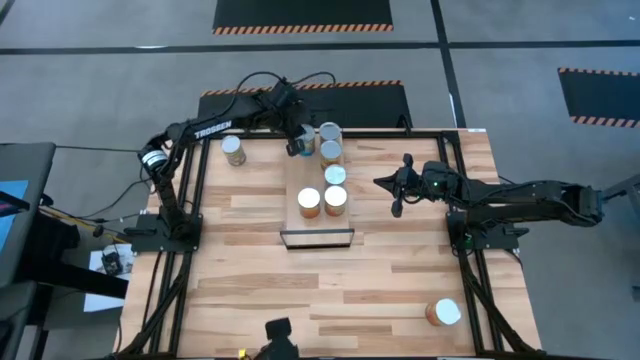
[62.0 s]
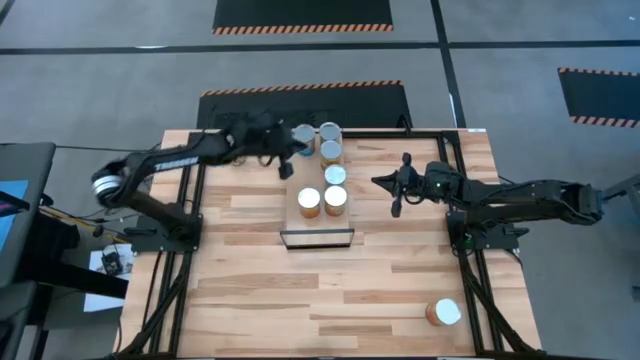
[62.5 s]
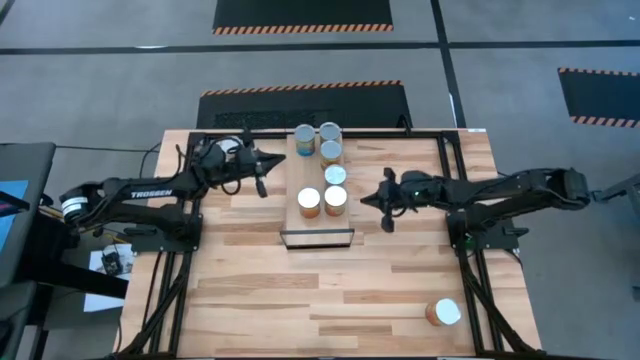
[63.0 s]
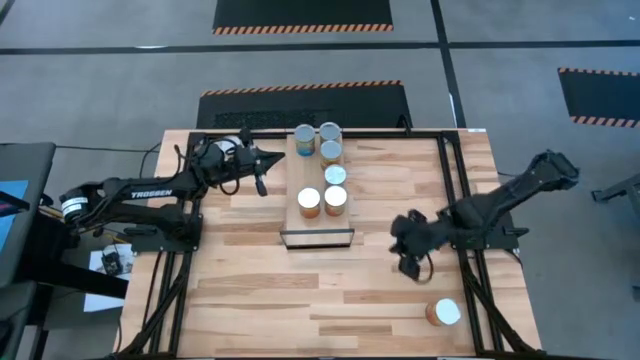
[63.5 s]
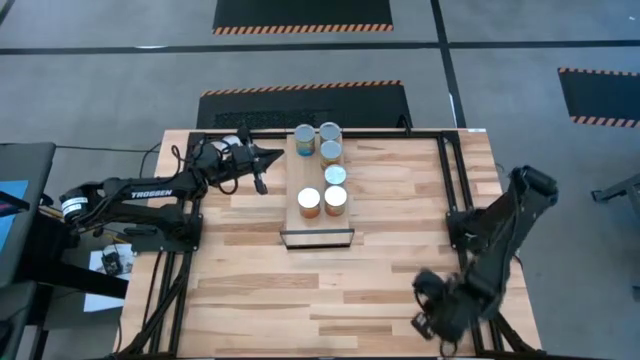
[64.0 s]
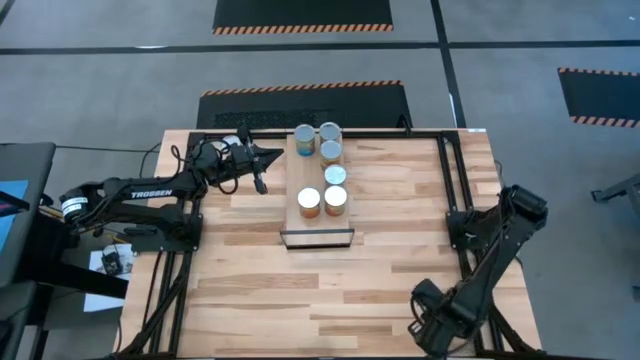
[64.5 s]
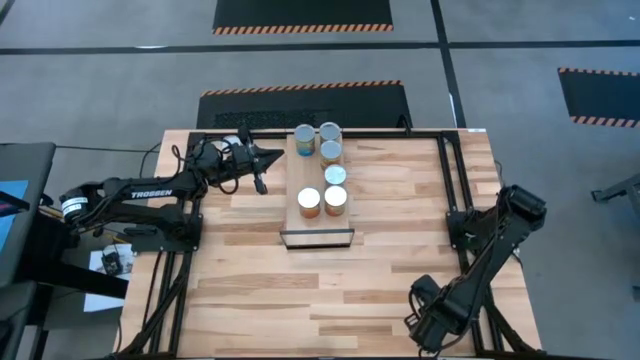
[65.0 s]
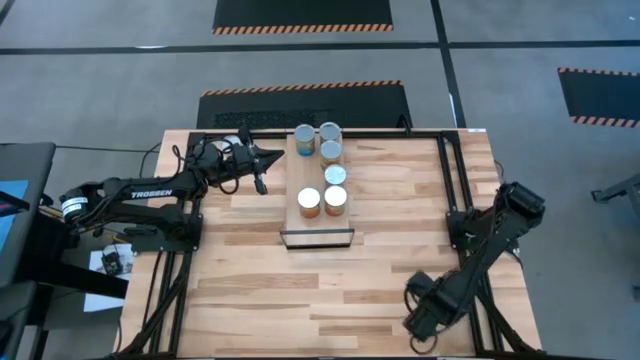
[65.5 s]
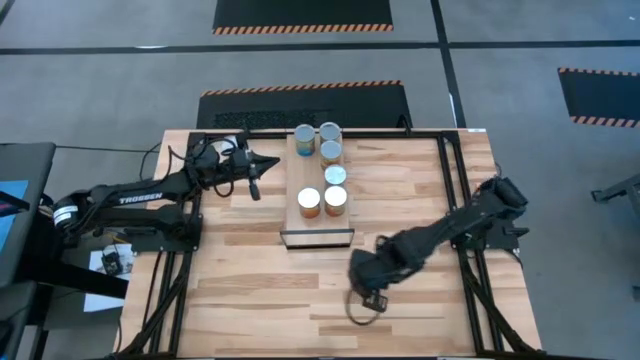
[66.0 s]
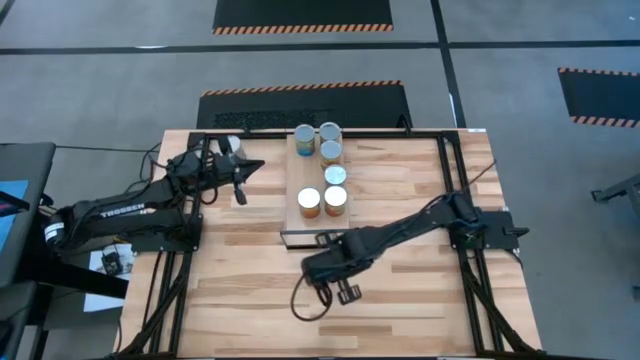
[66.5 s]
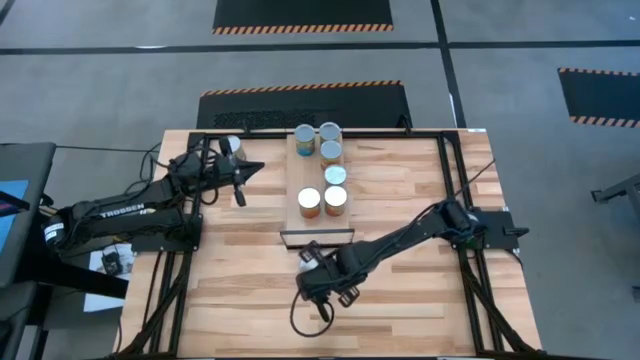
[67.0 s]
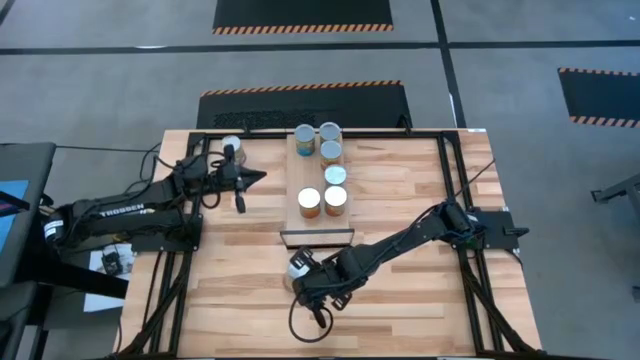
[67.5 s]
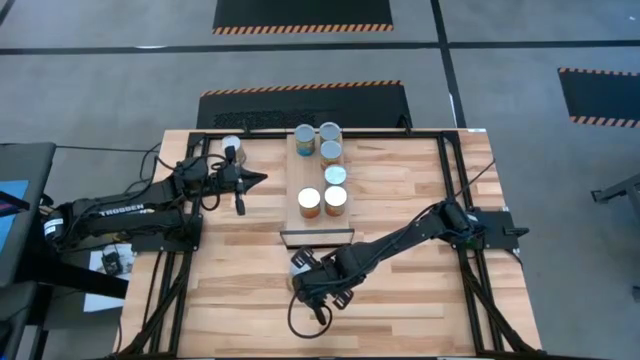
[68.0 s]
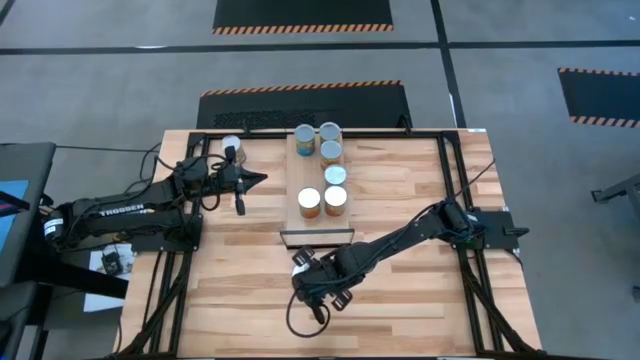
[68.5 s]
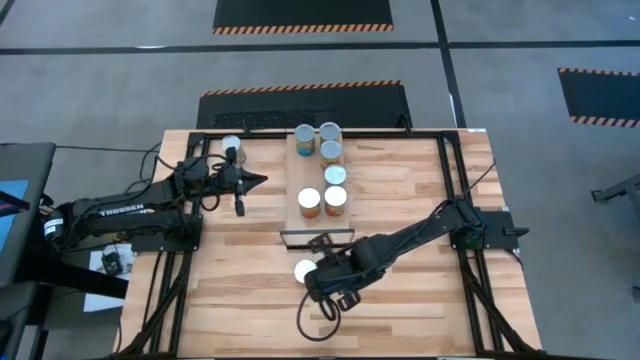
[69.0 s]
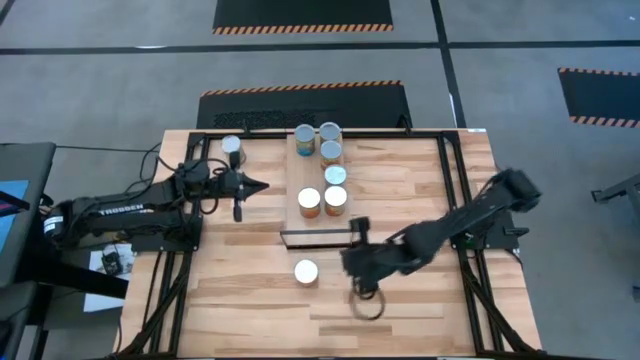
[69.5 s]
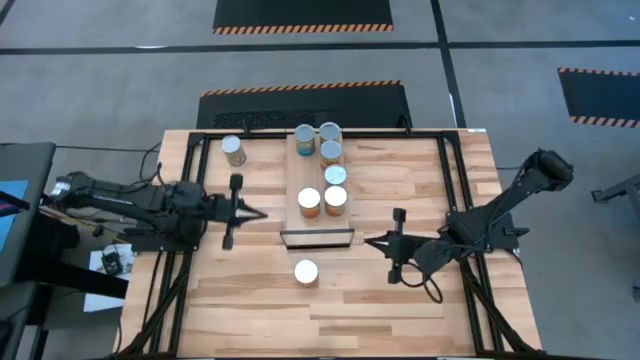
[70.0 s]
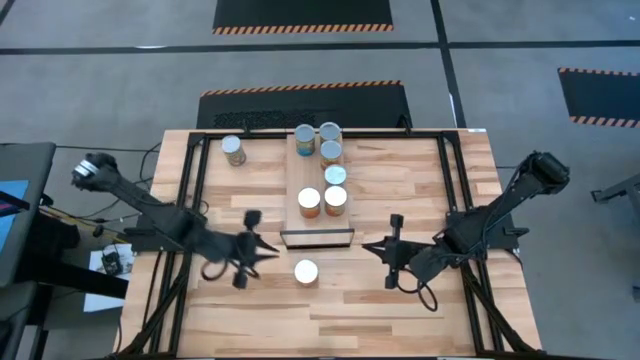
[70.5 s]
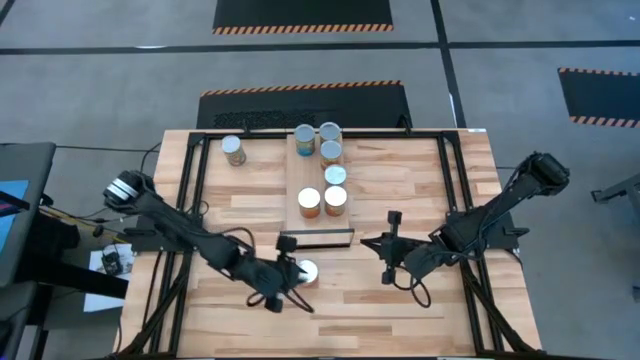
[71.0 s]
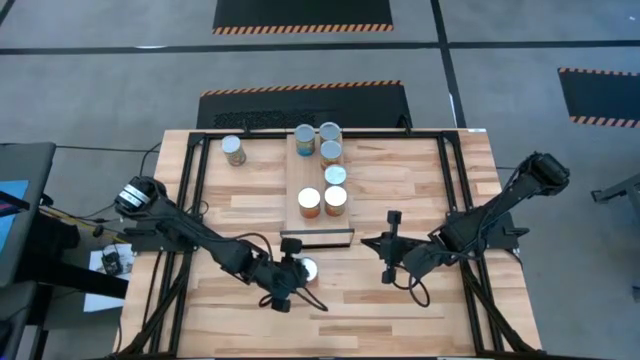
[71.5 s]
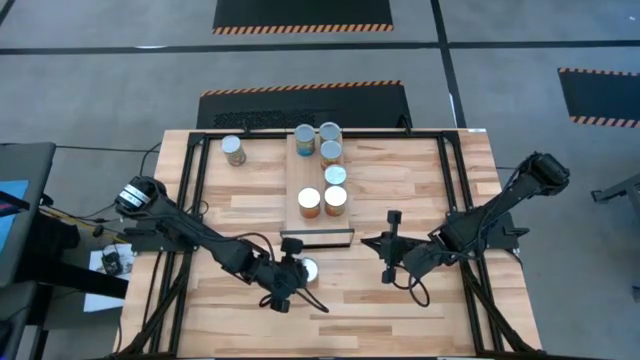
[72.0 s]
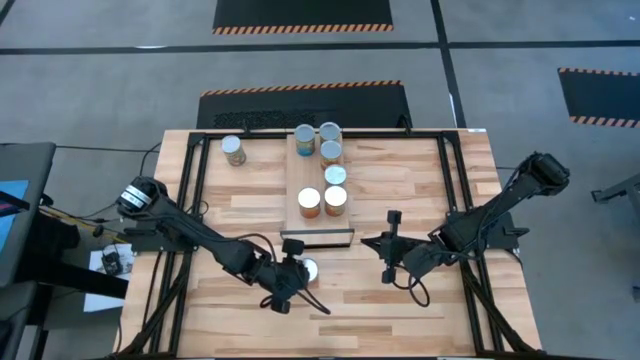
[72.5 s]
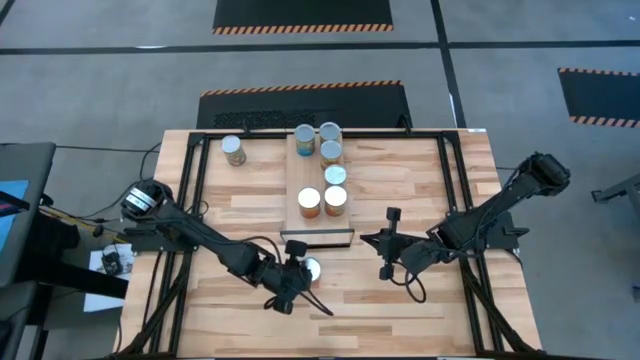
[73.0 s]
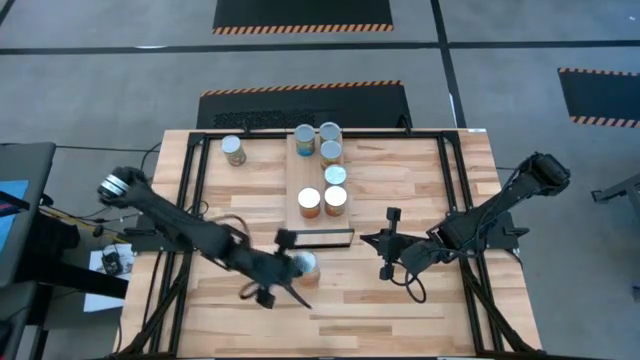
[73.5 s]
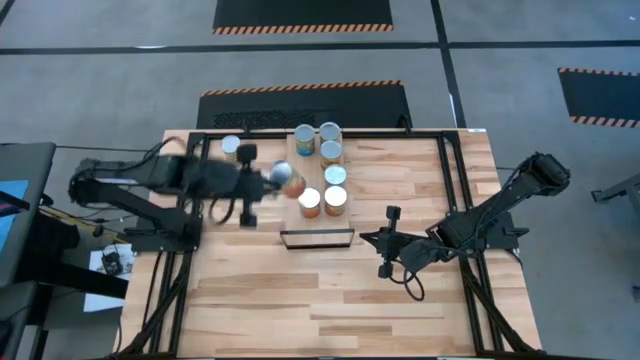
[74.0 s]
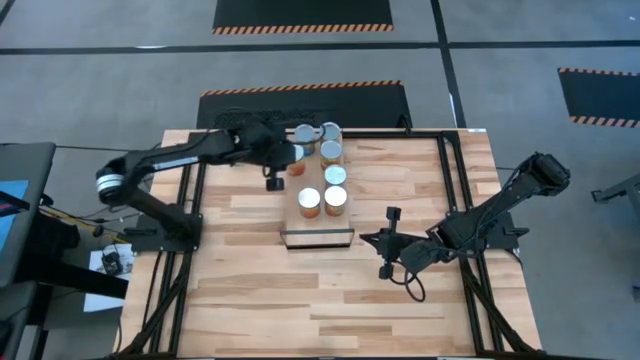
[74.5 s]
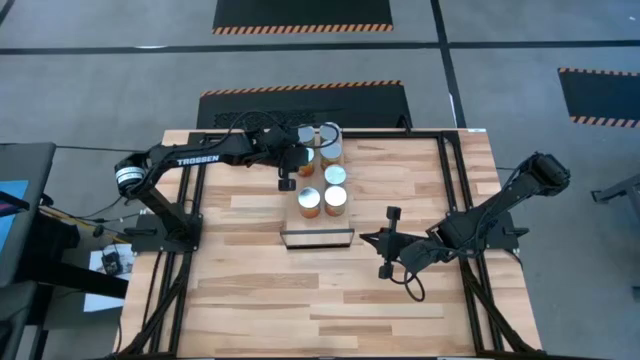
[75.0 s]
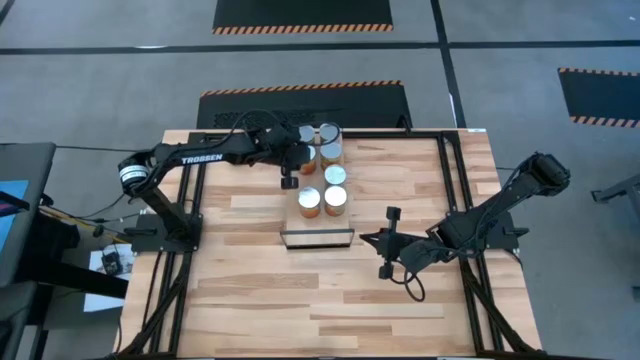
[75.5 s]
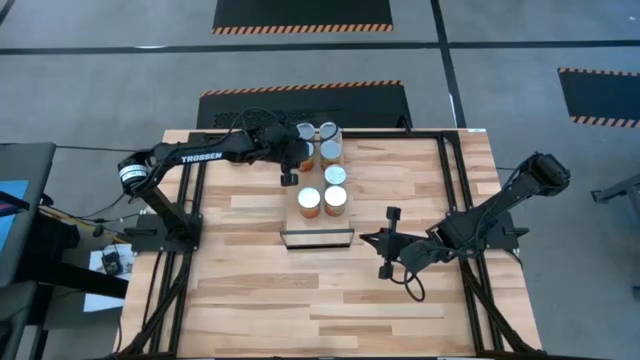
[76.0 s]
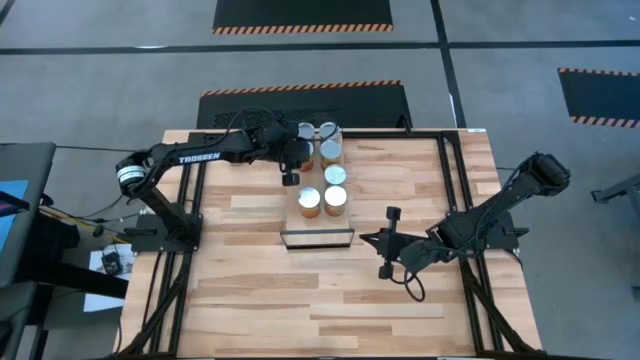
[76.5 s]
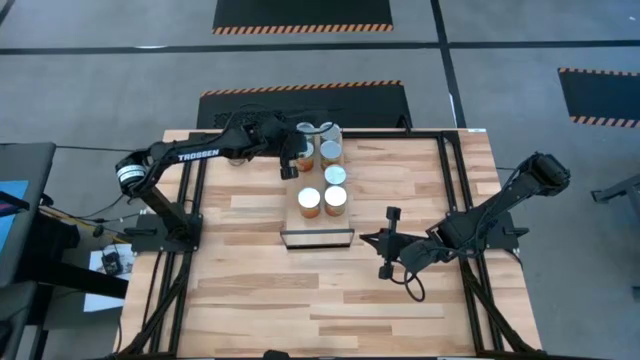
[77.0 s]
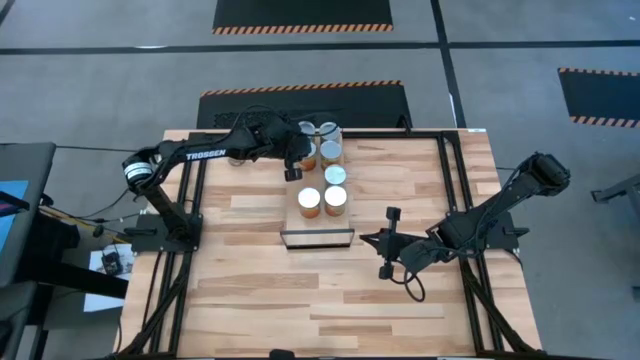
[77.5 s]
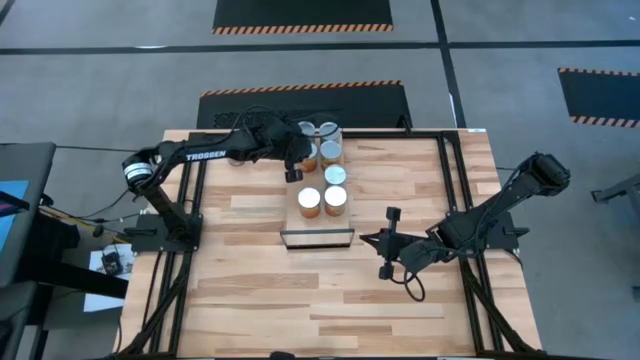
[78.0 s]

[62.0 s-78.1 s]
Task: Pick and place cans onto a shelf
Align the canned corn with the other canned corn on the shelf

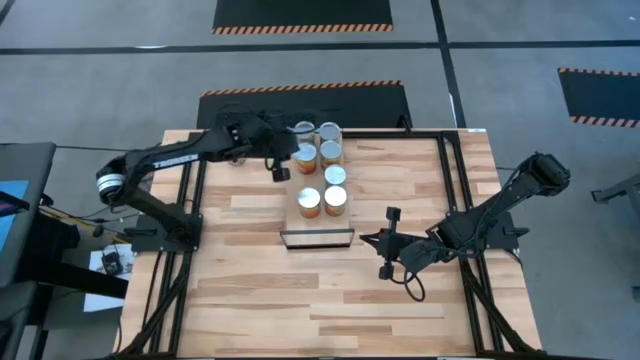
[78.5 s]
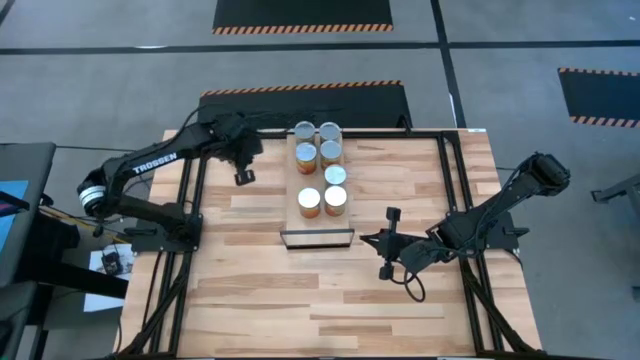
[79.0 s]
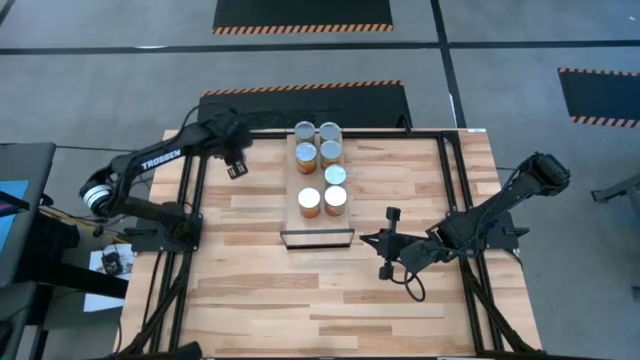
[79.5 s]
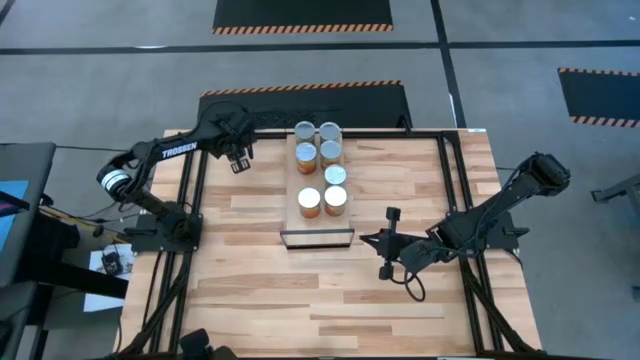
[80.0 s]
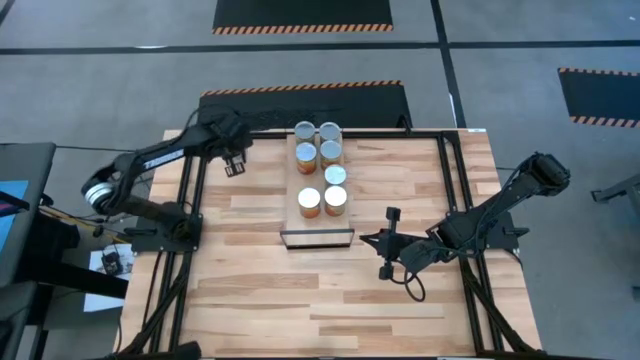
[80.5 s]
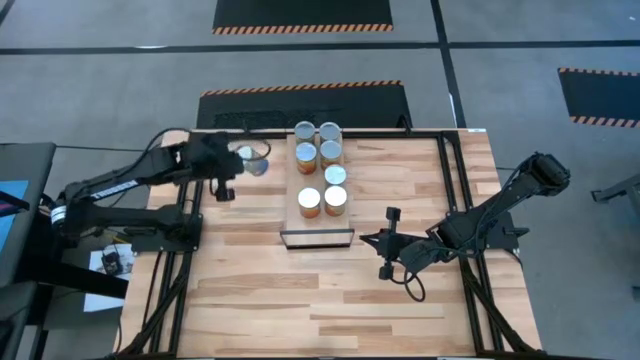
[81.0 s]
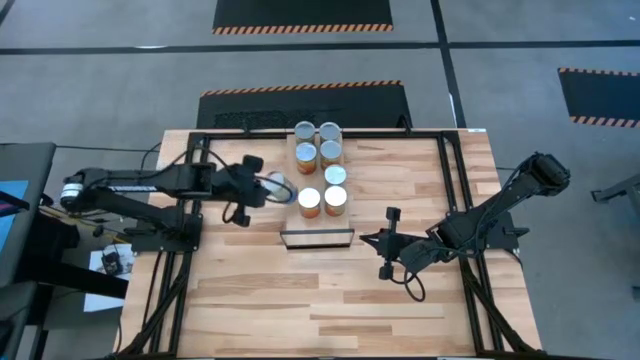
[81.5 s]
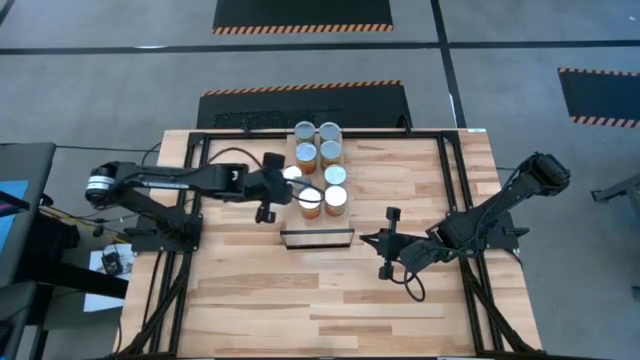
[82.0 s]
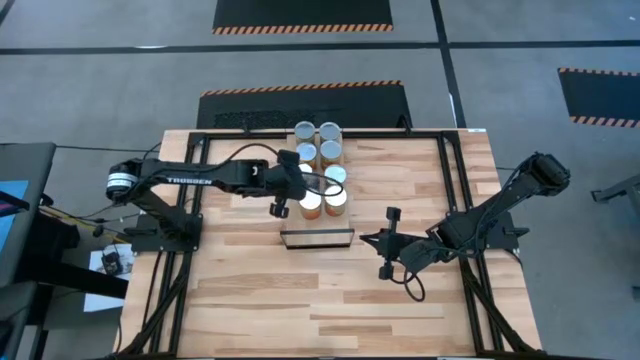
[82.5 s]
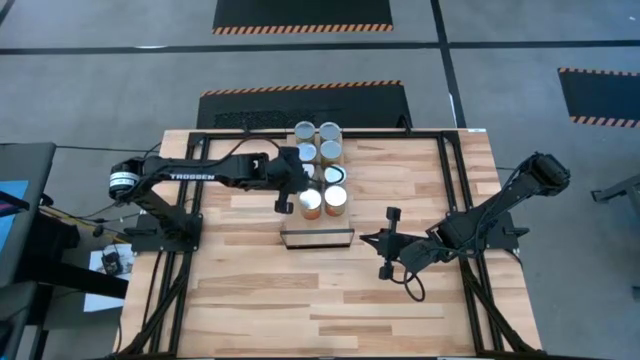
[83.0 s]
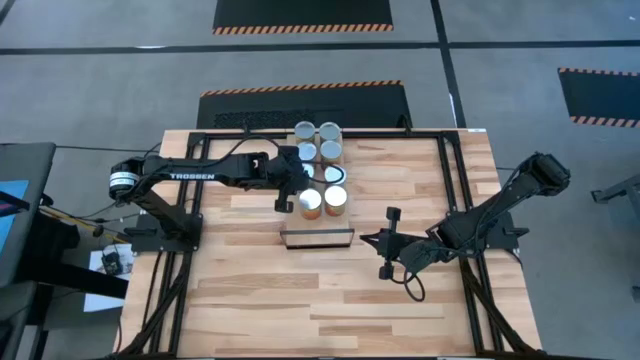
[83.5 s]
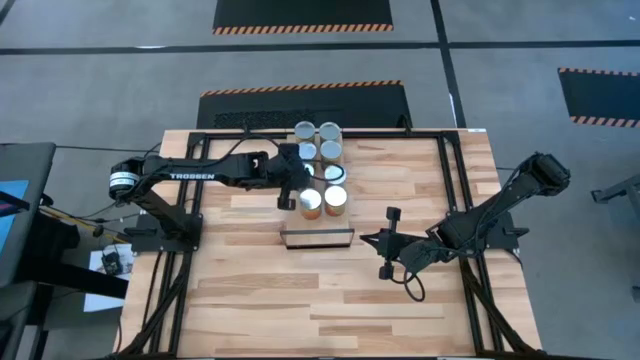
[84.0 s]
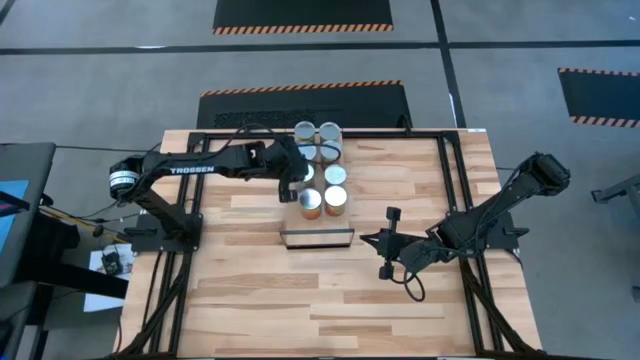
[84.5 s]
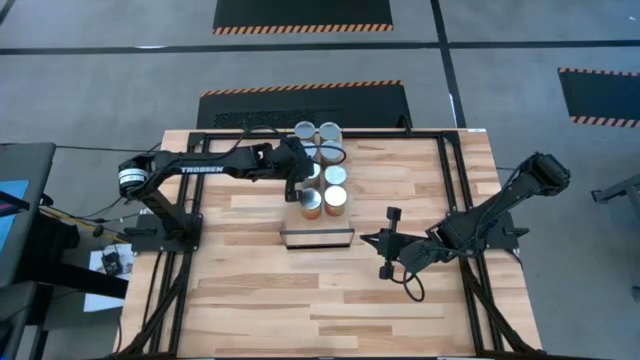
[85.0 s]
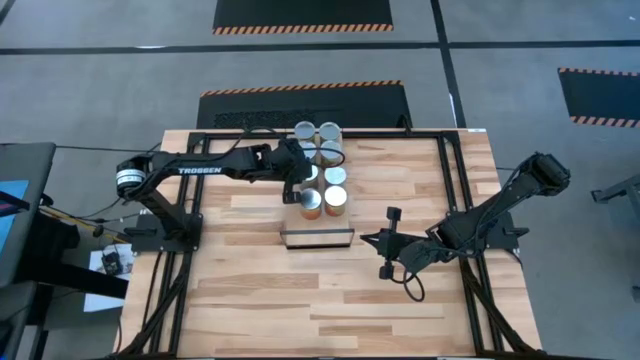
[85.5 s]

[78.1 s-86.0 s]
Align the canned peaches with the other canned peaches on the shelf
